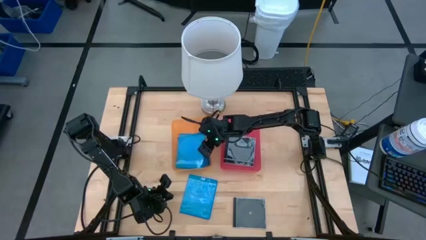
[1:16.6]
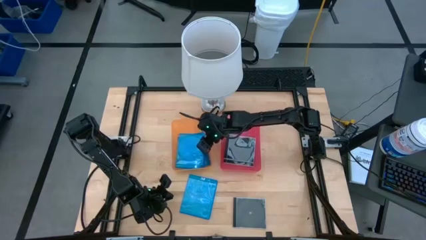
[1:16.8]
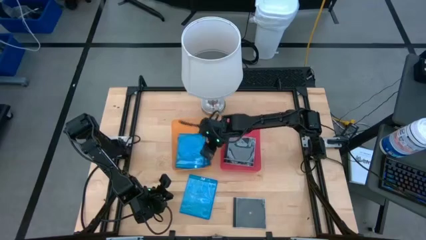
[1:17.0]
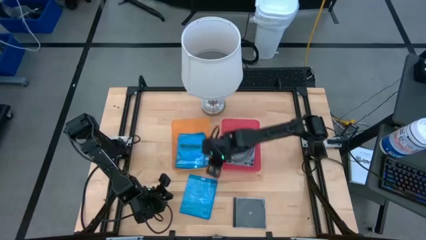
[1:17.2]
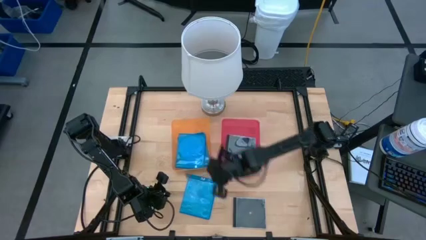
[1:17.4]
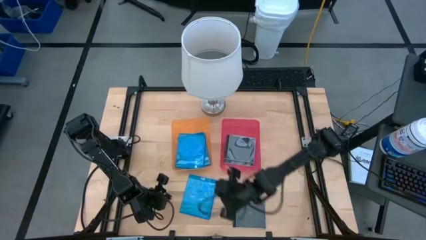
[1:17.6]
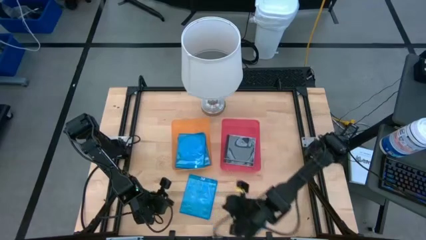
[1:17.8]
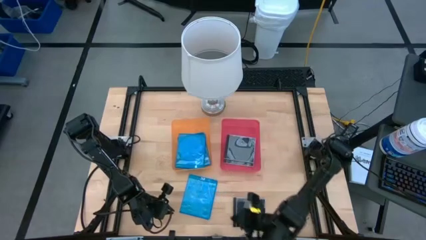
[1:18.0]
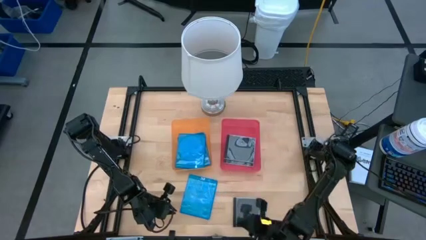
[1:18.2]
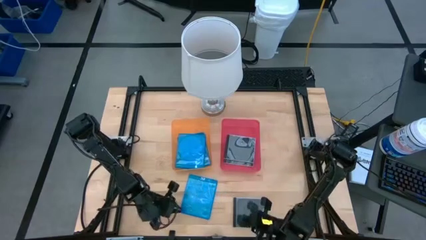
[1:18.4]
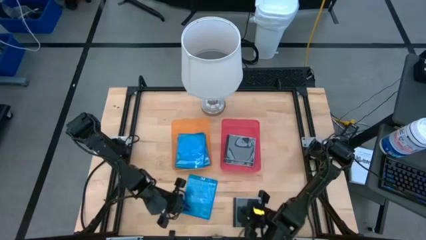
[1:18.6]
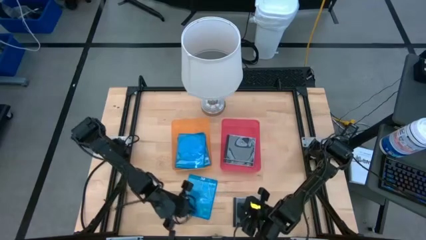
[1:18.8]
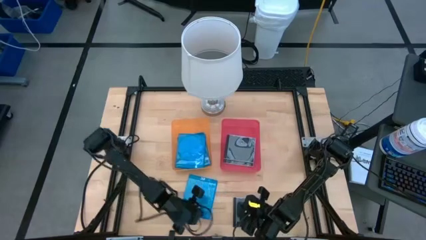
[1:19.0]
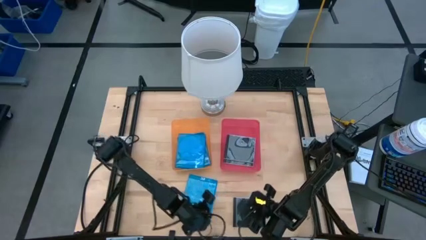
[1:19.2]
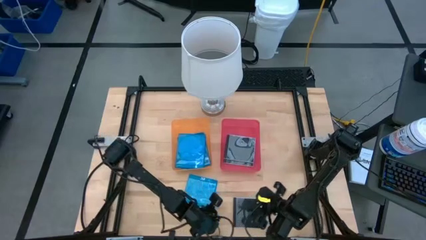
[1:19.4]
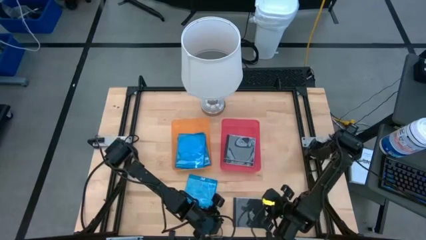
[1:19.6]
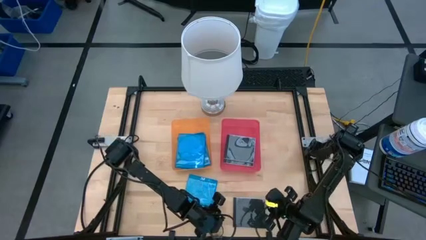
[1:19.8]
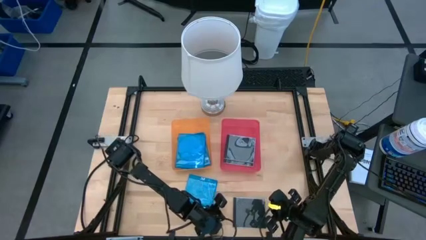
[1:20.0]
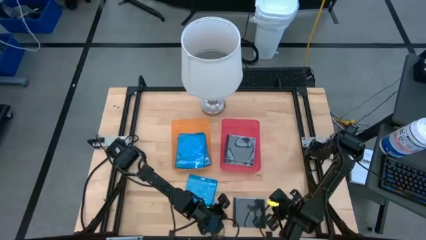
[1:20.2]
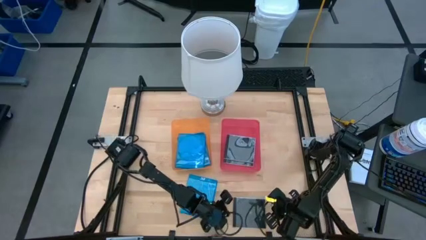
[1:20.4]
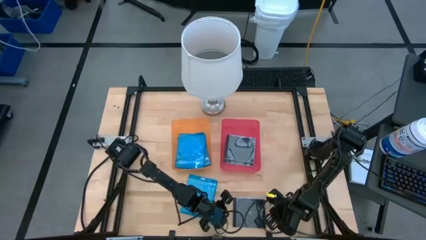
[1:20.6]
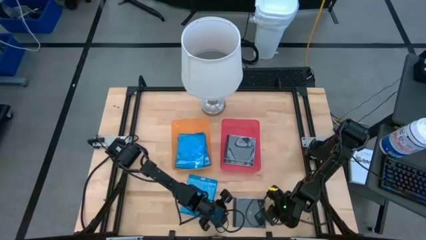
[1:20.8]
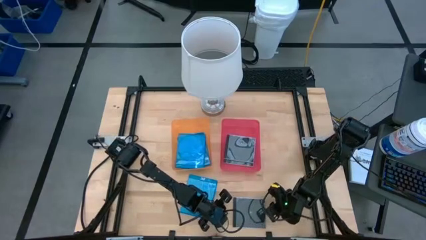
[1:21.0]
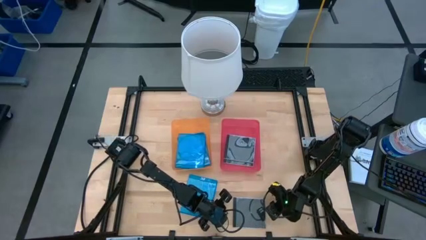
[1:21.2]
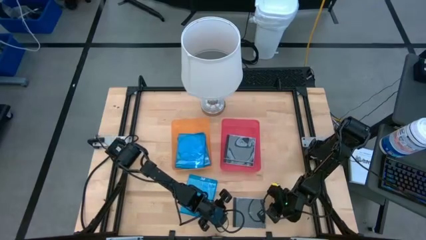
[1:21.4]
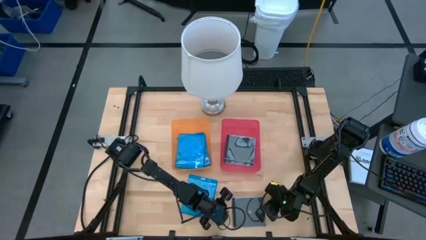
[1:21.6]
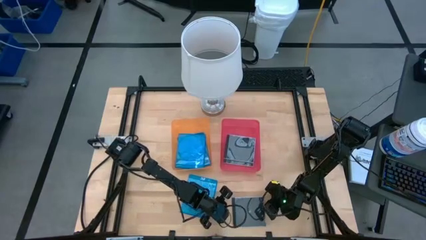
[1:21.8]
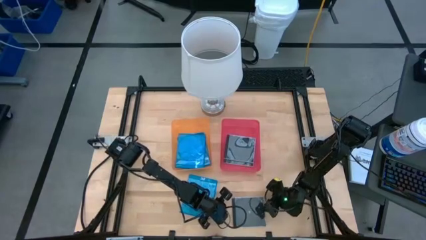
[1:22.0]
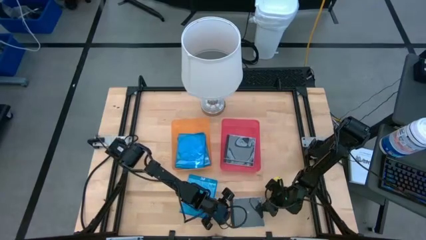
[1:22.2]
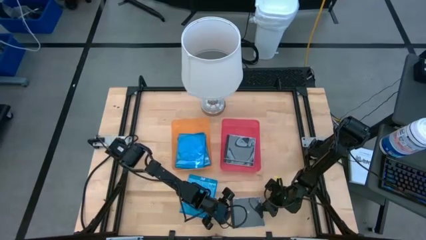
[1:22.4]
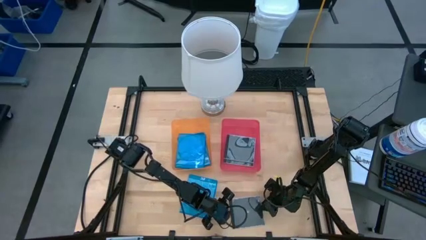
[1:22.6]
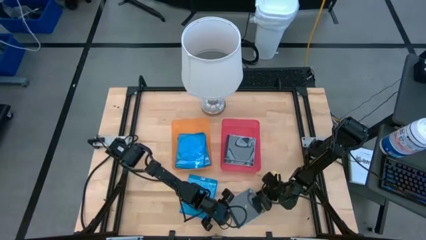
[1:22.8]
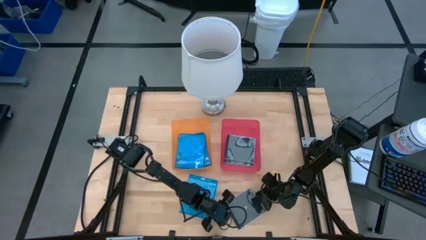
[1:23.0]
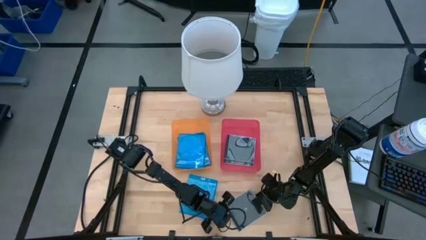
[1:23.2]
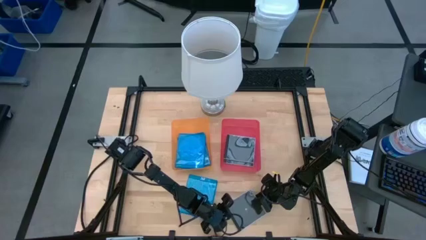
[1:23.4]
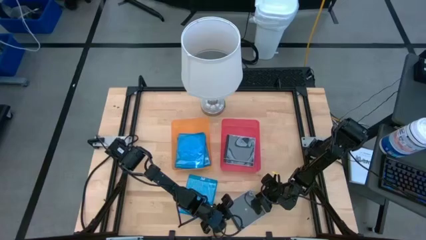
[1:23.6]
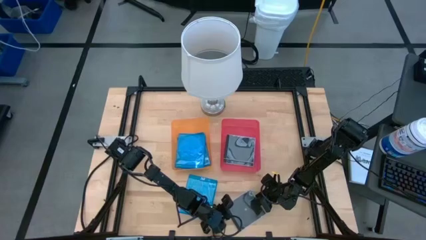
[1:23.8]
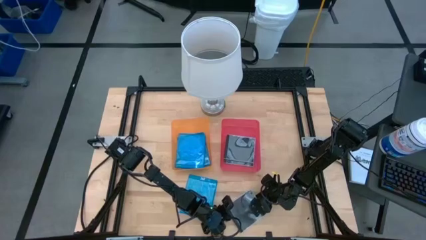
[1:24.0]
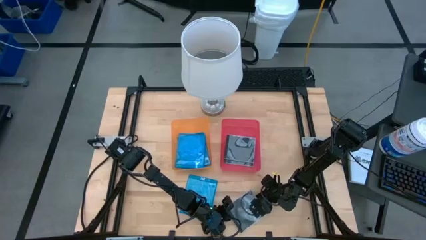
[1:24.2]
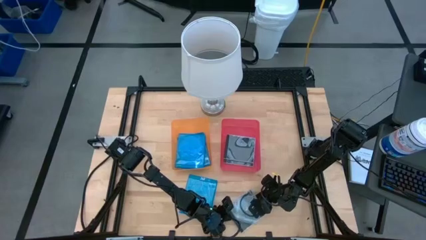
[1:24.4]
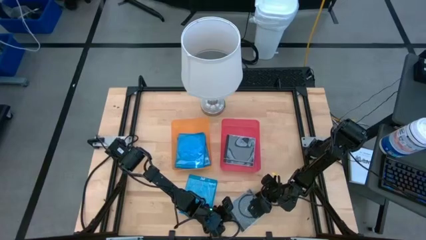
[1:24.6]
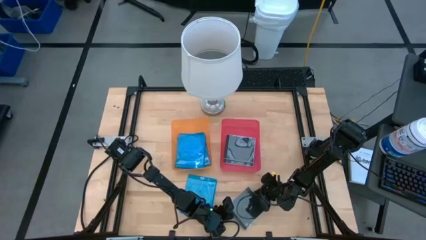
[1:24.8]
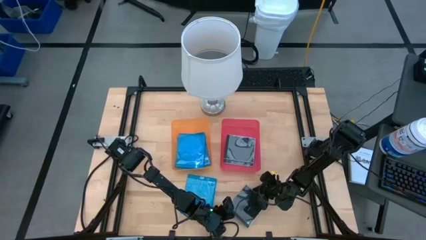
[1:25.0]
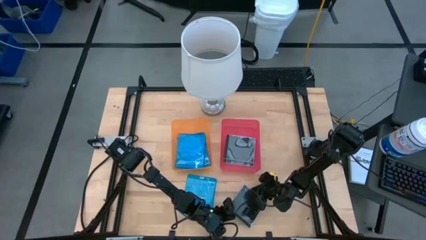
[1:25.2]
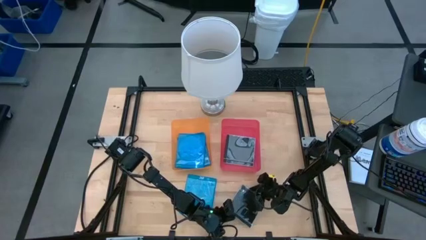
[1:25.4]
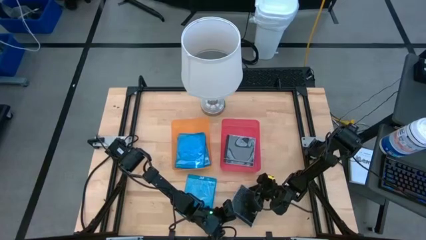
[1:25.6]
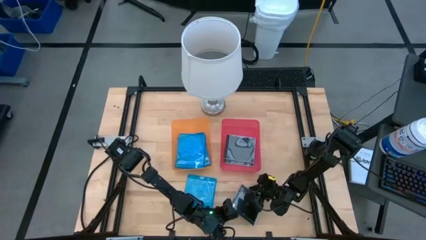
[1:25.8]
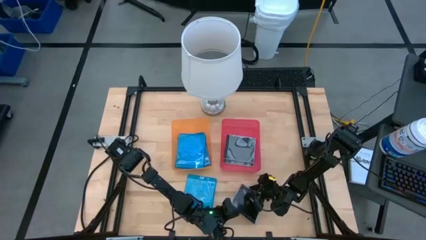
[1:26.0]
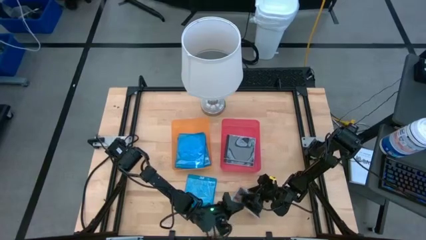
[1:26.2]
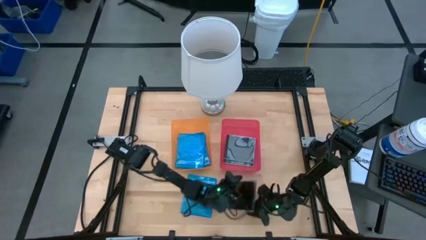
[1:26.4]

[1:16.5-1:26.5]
Task: Pick & place jewel cases by type
Put the black CD case into the red bin
